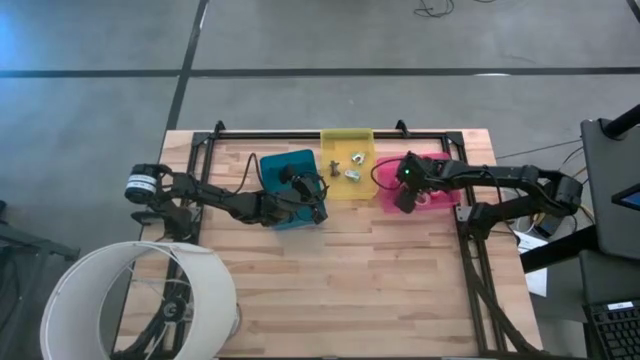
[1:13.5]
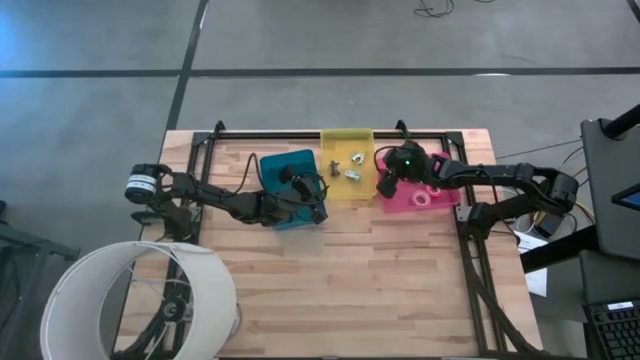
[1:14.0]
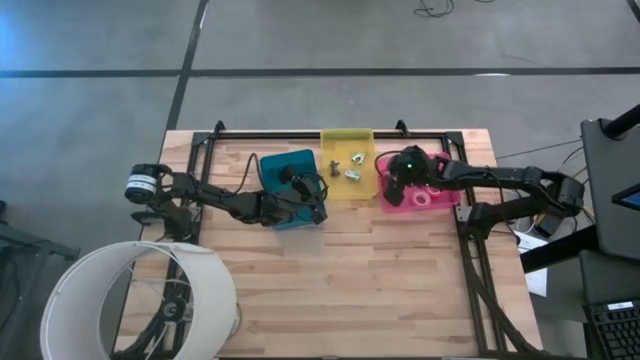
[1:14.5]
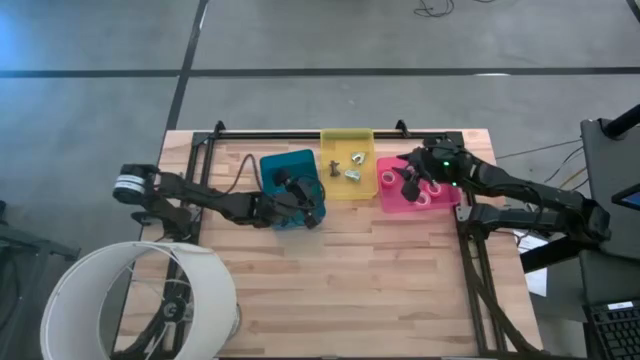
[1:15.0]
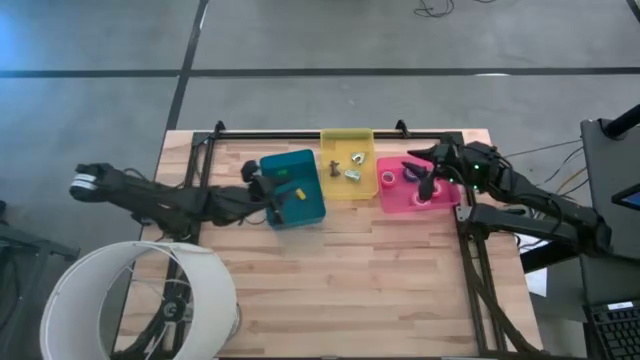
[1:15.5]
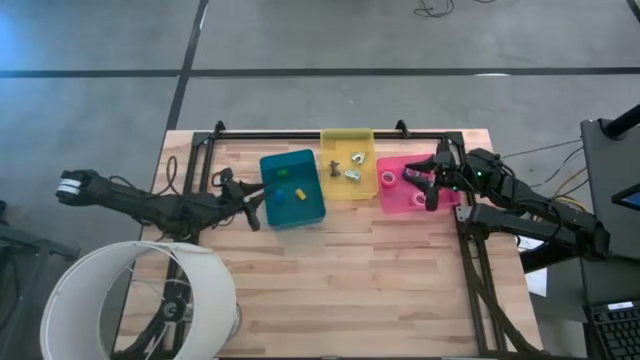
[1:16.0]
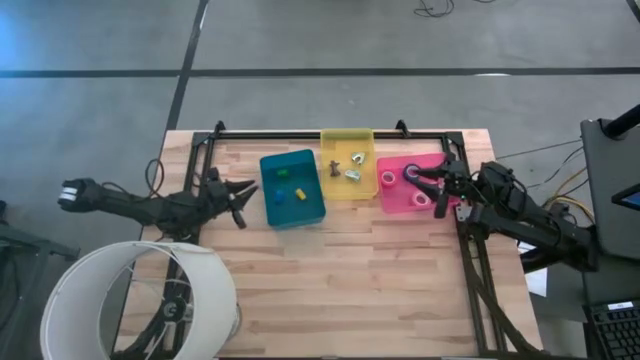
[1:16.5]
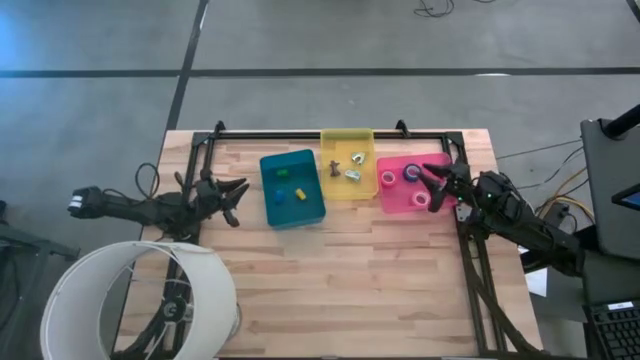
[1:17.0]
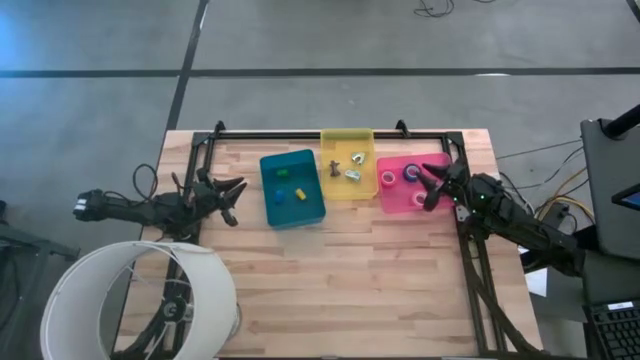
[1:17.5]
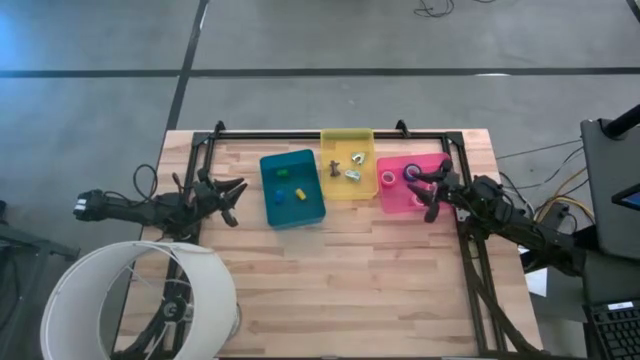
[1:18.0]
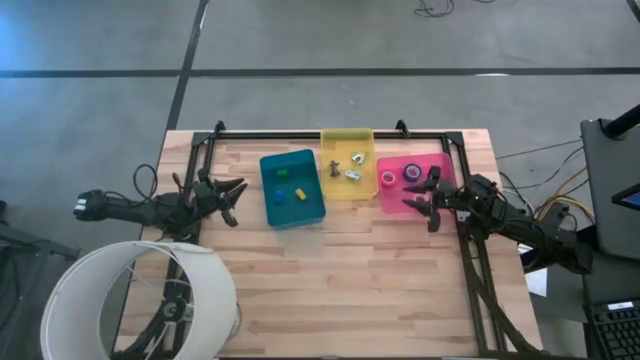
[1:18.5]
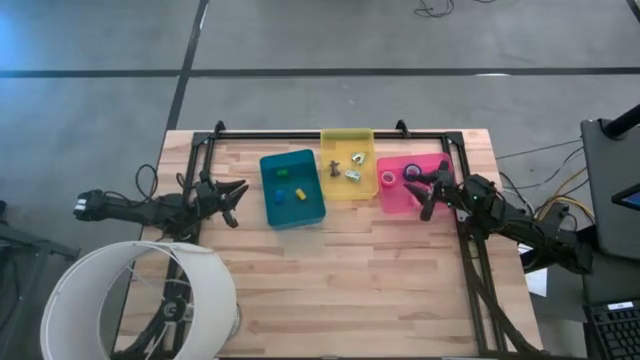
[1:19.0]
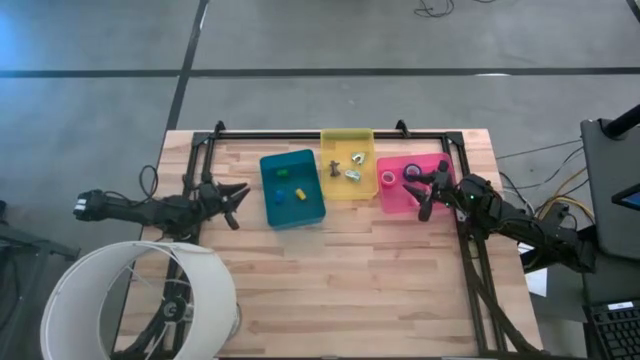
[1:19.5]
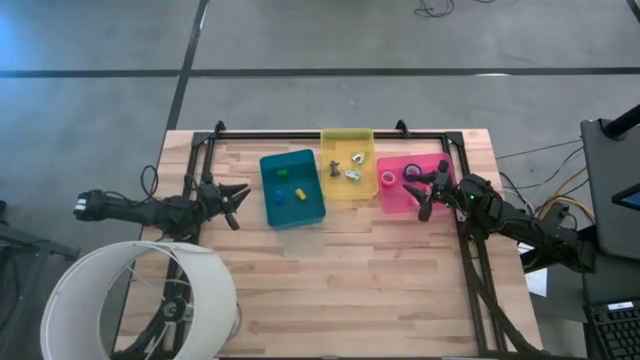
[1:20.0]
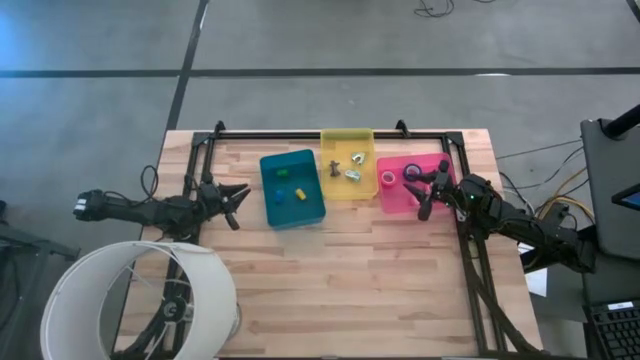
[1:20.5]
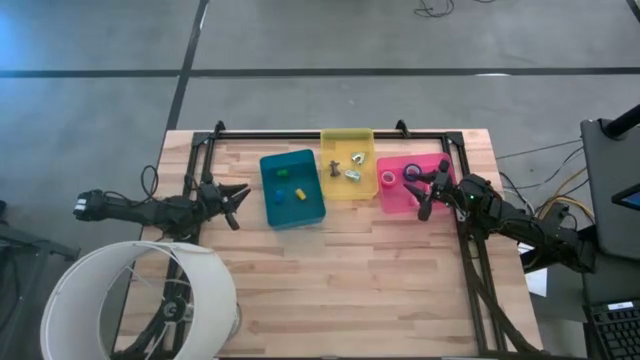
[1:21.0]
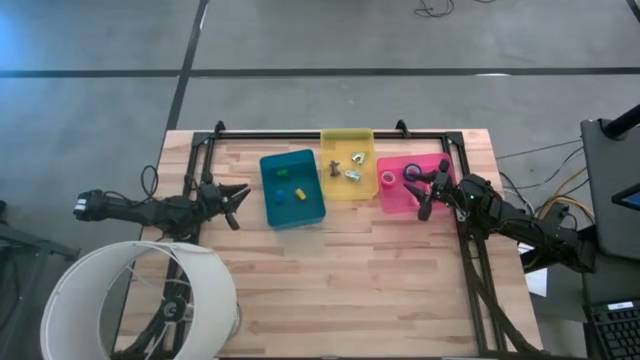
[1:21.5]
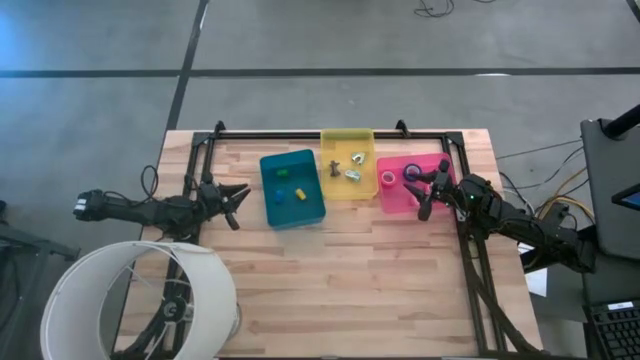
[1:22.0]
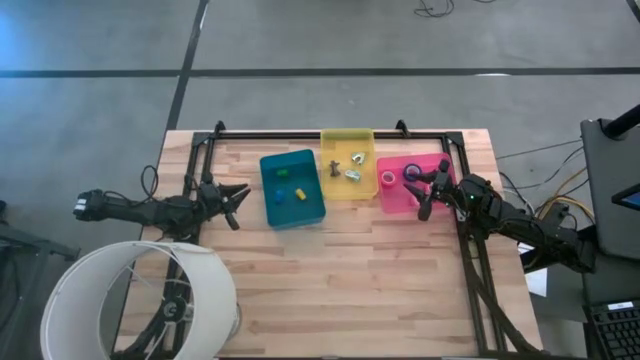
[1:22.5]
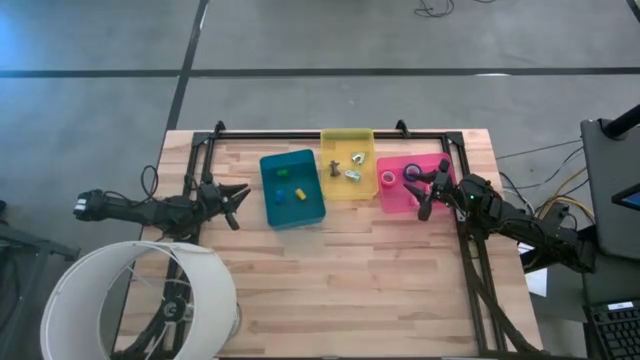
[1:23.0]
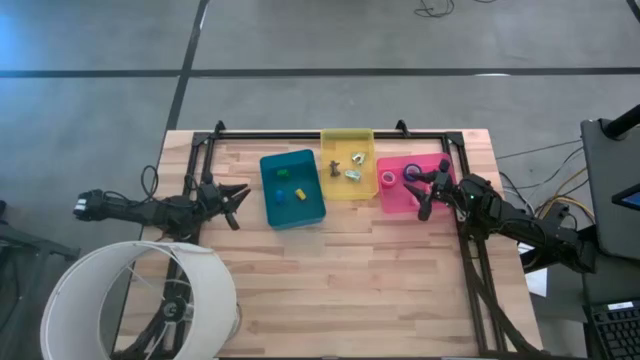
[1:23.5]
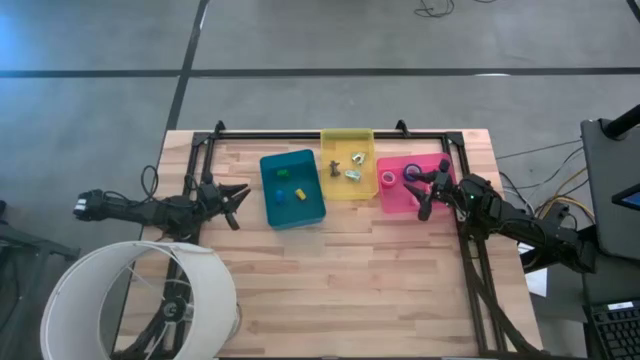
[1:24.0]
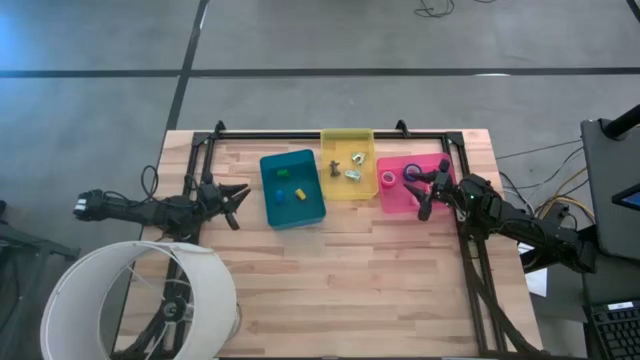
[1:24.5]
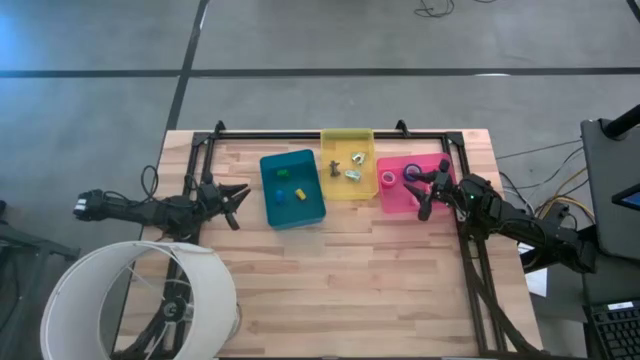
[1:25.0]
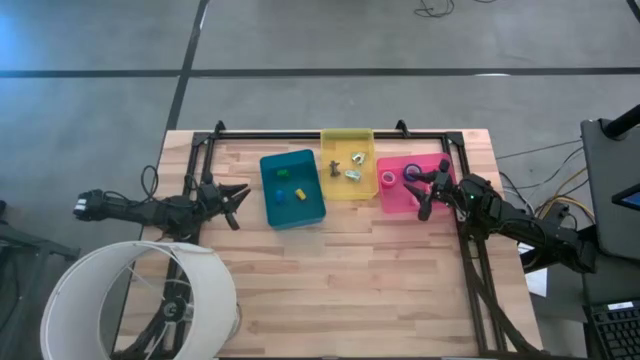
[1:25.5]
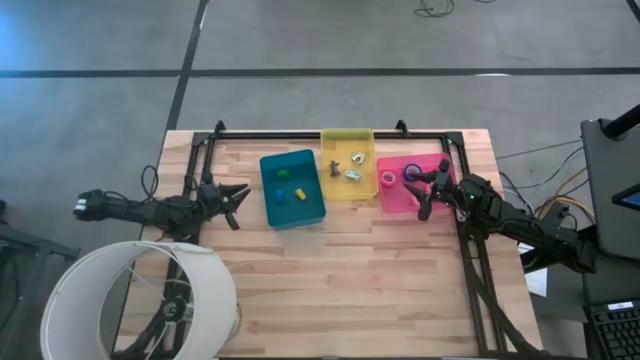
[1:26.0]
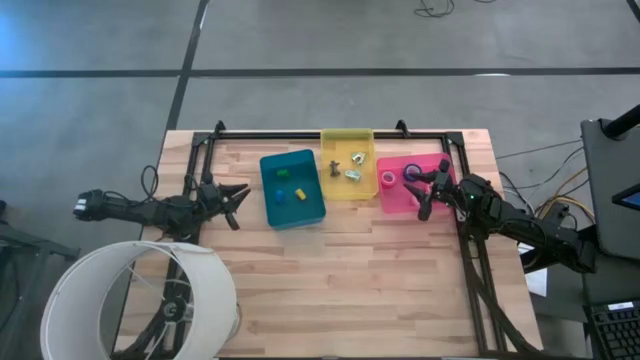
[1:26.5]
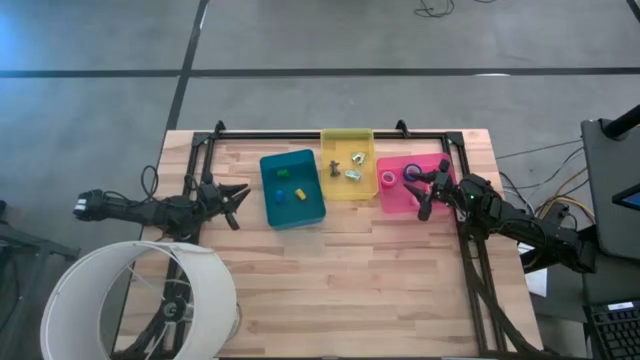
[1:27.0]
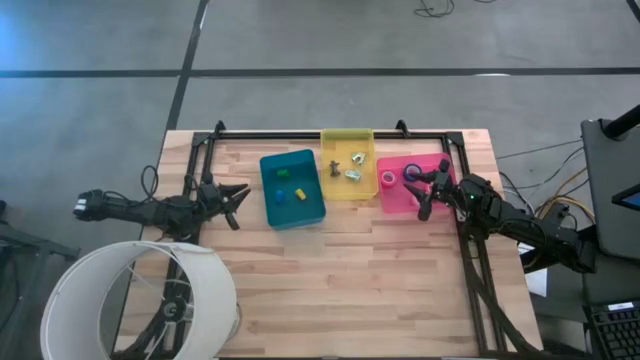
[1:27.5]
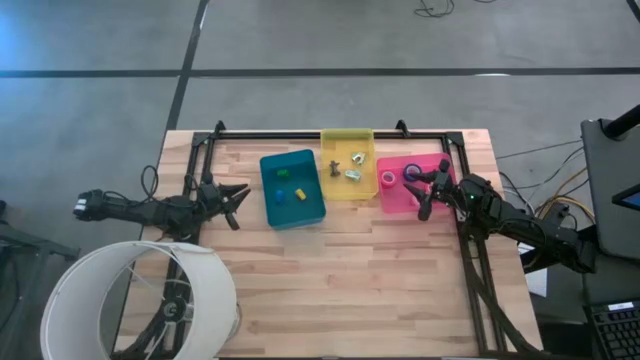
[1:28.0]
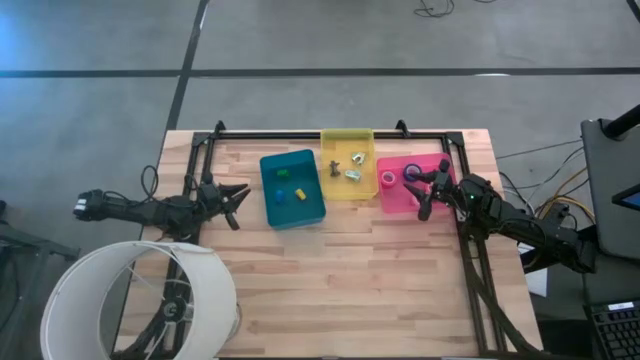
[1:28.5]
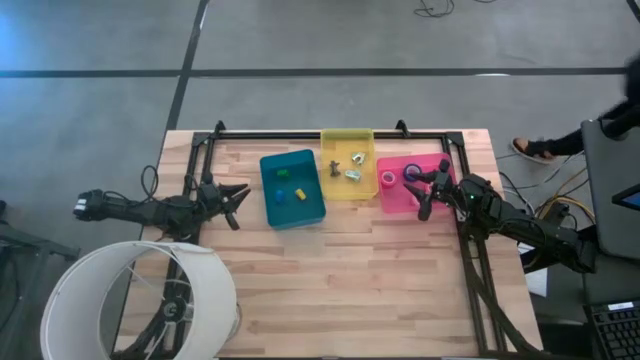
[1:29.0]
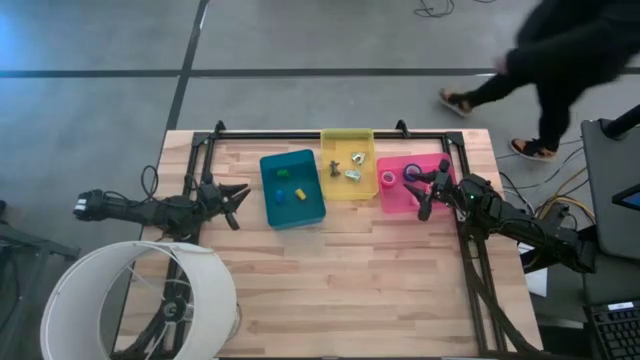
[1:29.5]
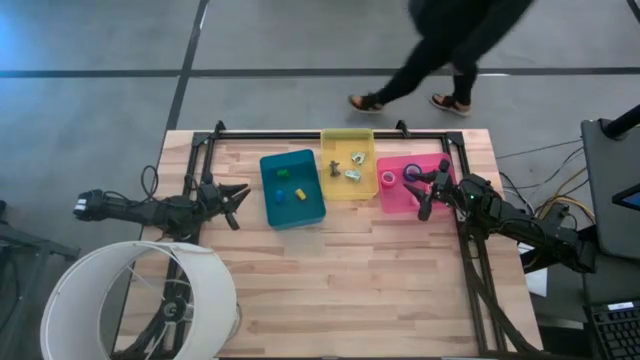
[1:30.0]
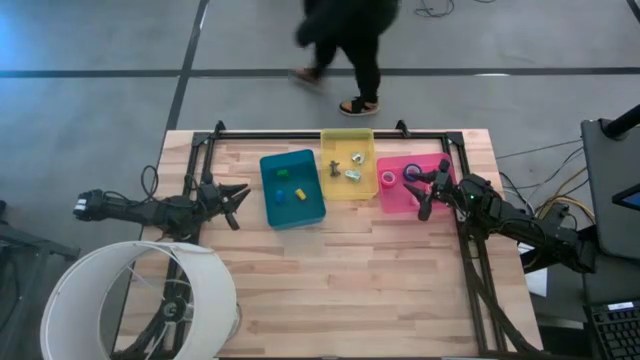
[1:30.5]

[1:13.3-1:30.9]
Task: Pick and place Stapler, Stapler remover, tape
Return to Home Position

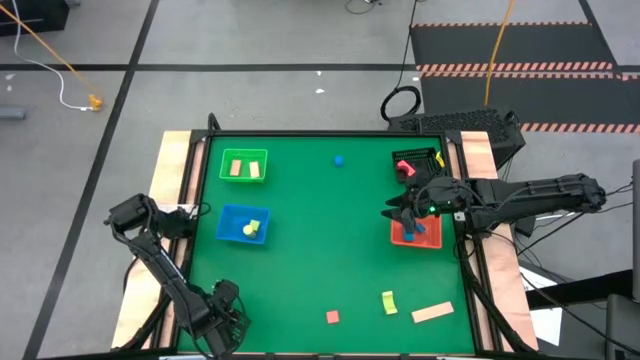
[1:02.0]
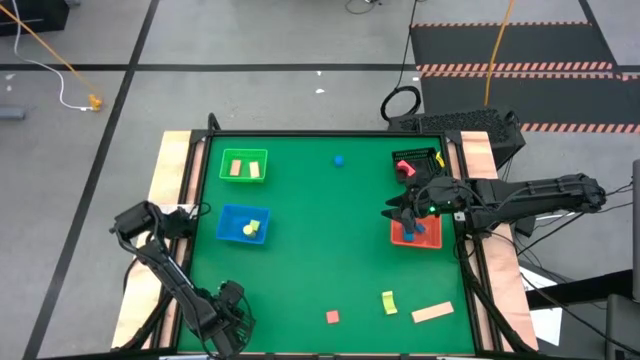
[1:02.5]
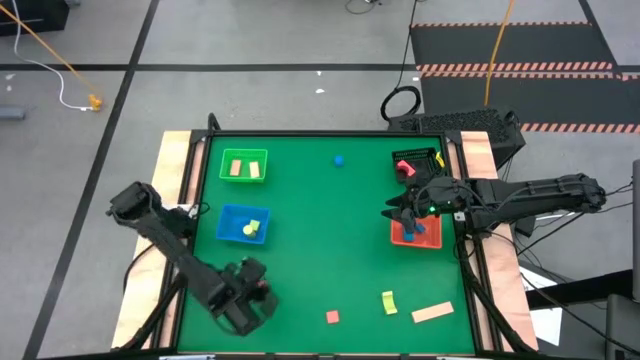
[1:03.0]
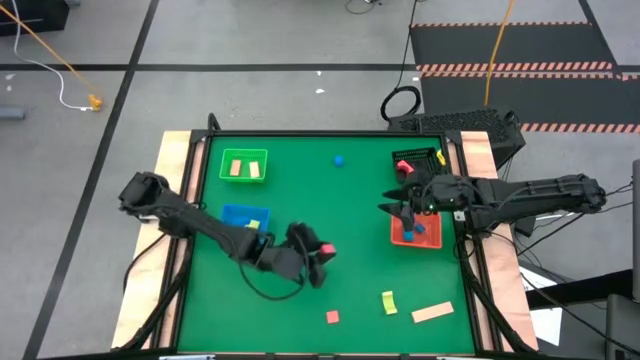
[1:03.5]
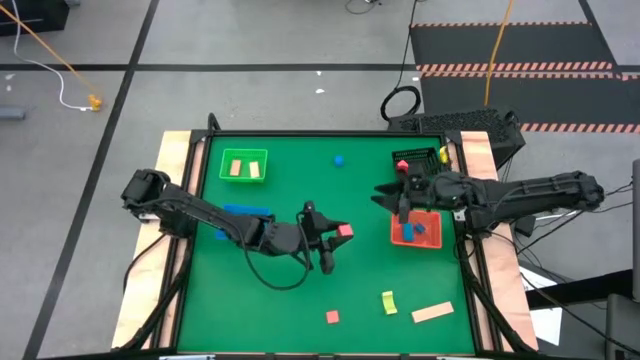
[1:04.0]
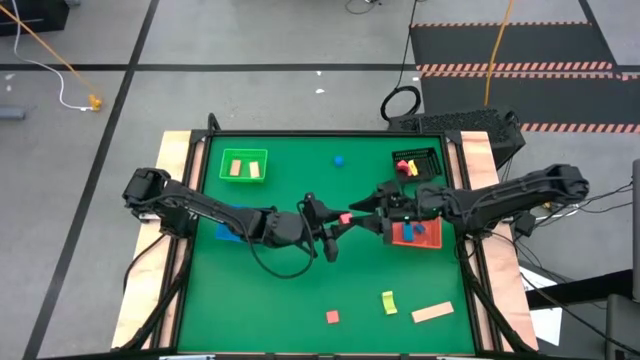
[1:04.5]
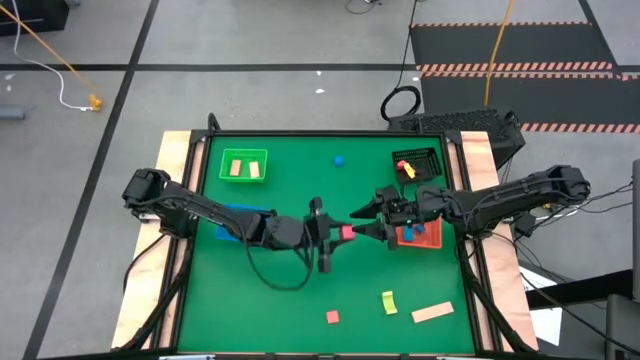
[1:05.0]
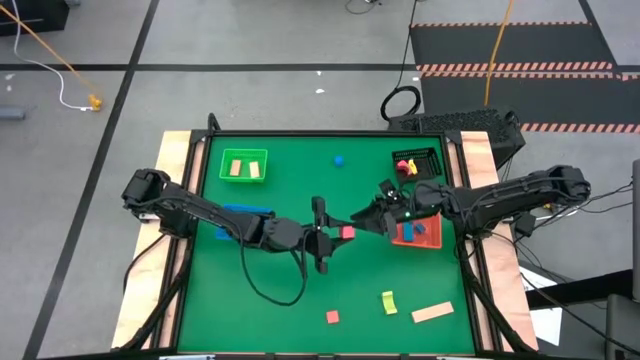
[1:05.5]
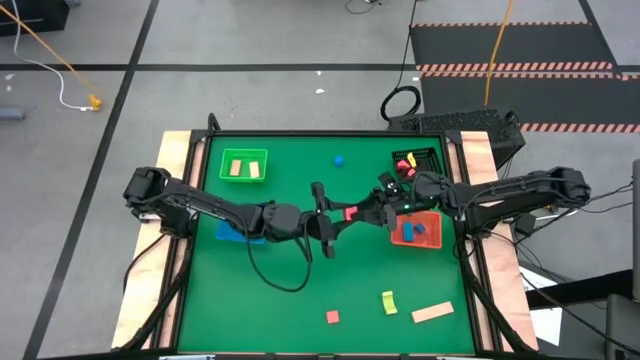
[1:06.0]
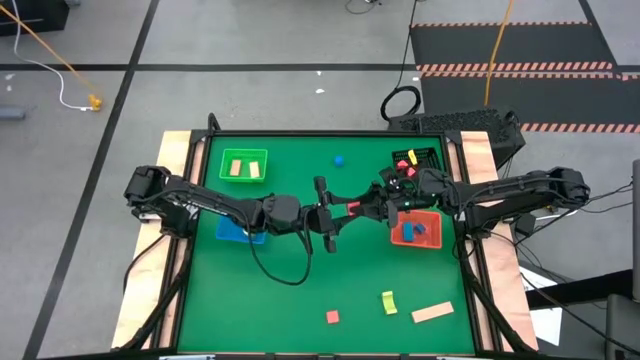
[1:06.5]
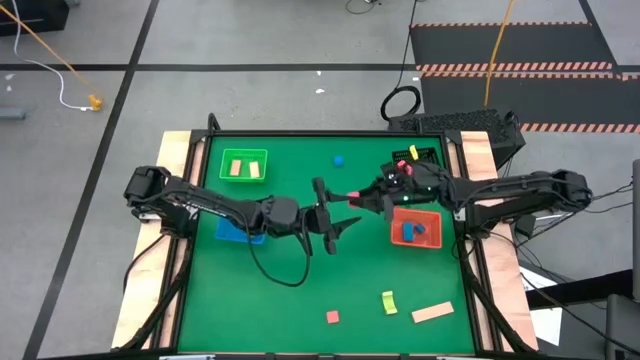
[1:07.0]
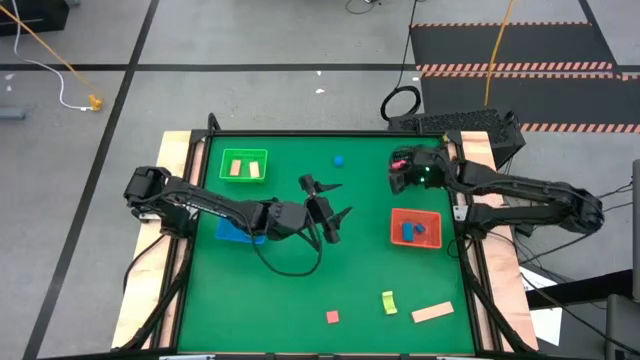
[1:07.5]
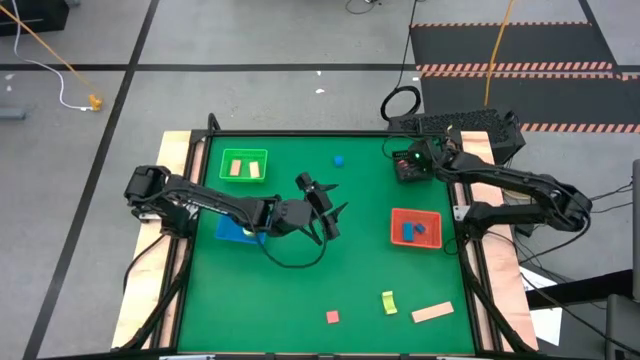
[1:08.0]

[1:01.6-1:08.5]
Task: Sort & place blocks by color
Put the left orange block into the black bin
